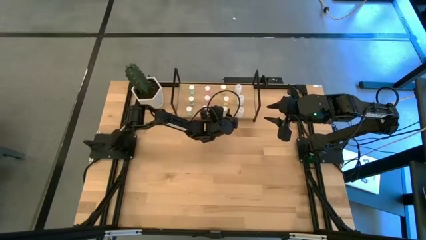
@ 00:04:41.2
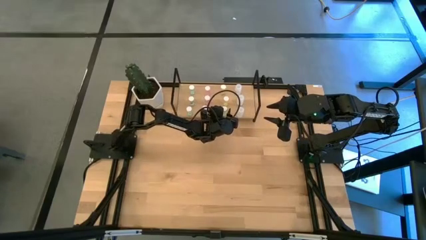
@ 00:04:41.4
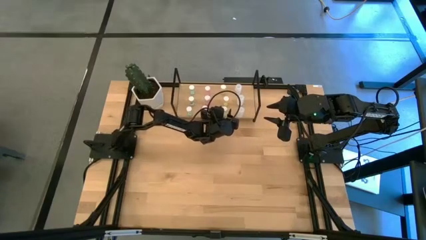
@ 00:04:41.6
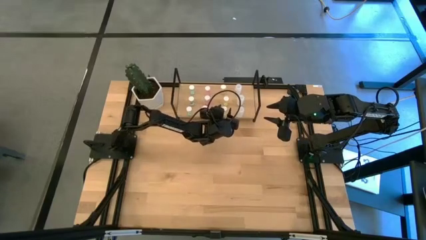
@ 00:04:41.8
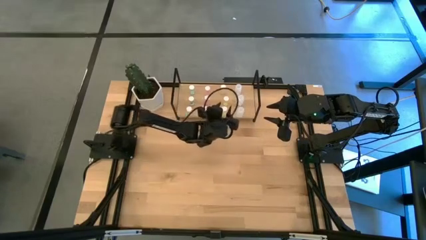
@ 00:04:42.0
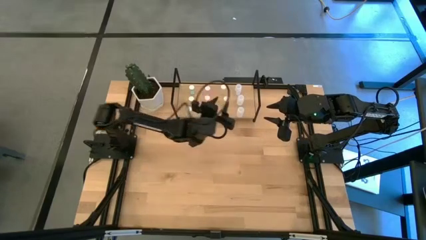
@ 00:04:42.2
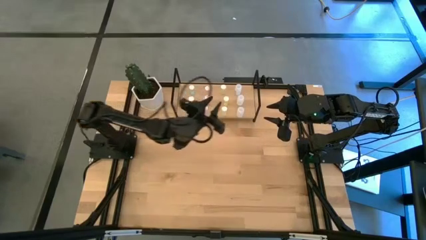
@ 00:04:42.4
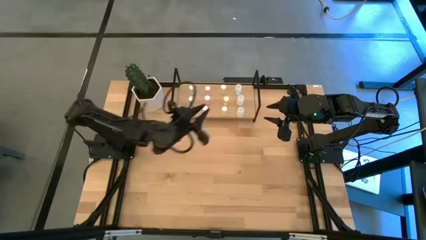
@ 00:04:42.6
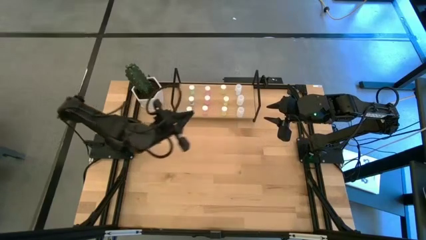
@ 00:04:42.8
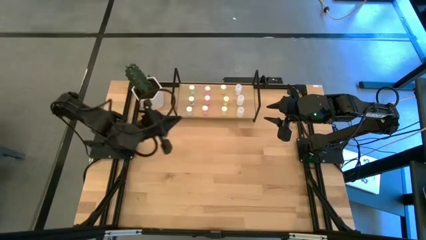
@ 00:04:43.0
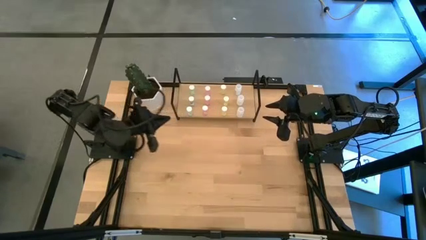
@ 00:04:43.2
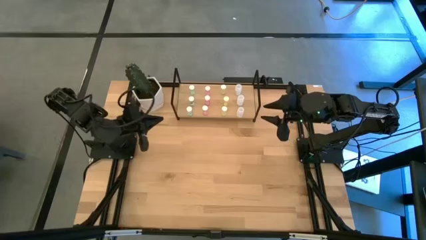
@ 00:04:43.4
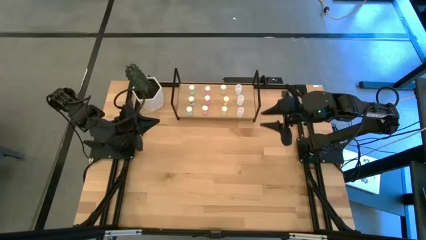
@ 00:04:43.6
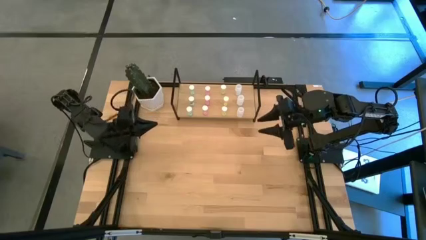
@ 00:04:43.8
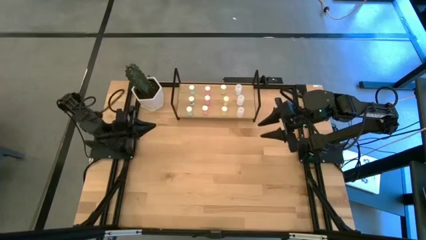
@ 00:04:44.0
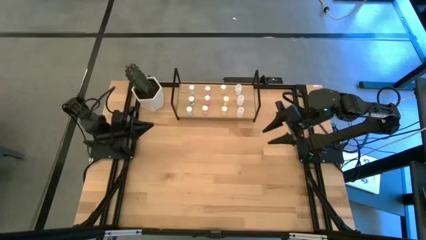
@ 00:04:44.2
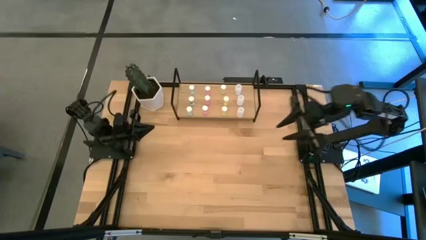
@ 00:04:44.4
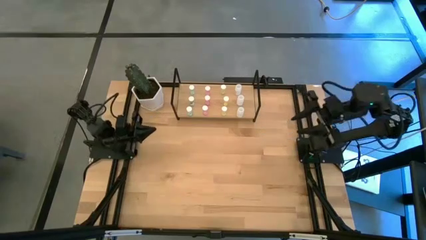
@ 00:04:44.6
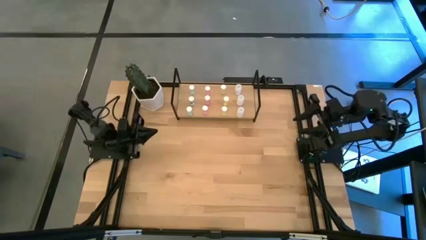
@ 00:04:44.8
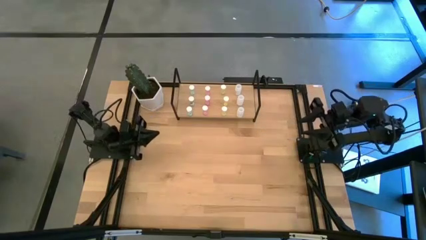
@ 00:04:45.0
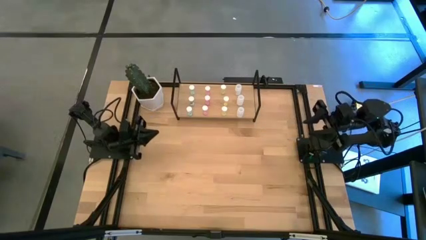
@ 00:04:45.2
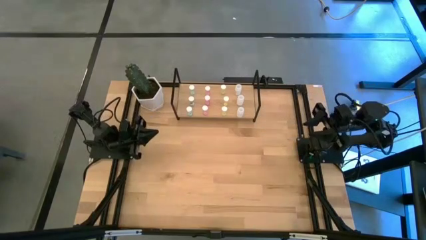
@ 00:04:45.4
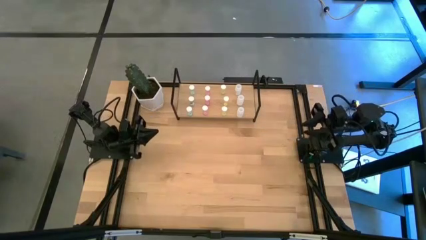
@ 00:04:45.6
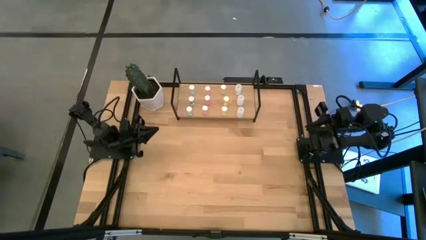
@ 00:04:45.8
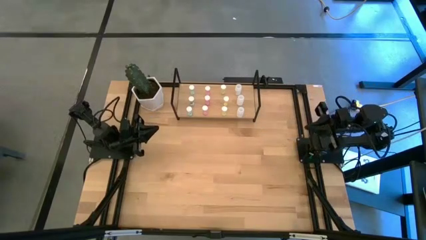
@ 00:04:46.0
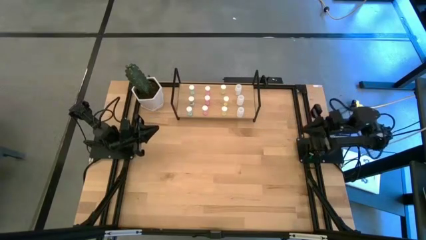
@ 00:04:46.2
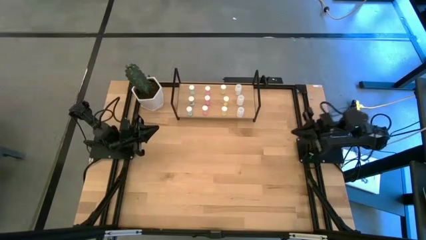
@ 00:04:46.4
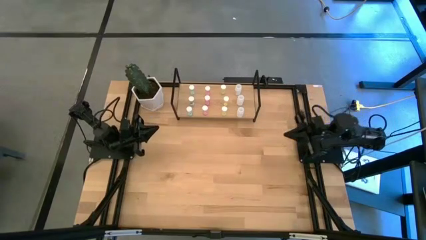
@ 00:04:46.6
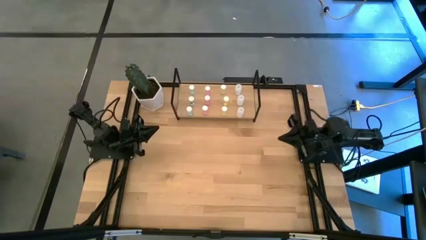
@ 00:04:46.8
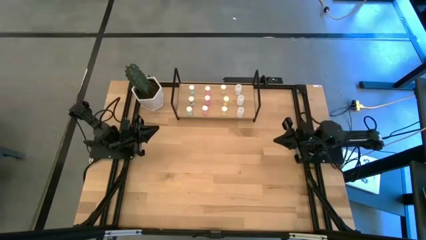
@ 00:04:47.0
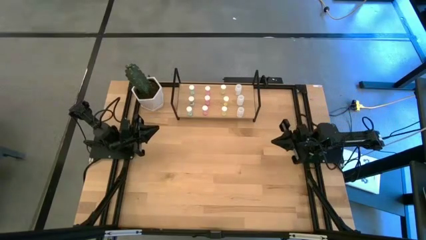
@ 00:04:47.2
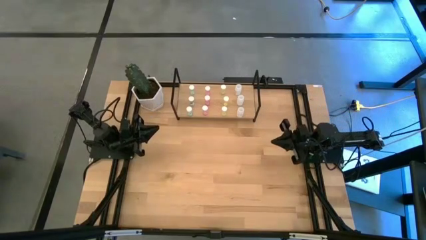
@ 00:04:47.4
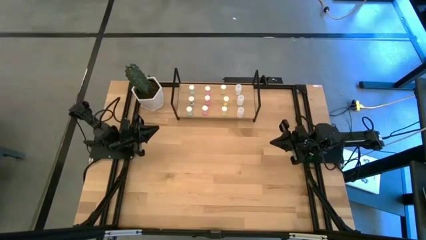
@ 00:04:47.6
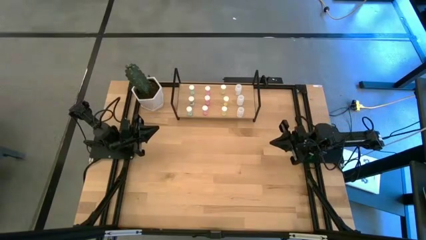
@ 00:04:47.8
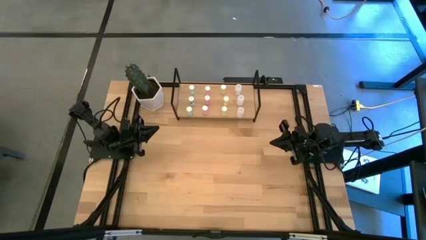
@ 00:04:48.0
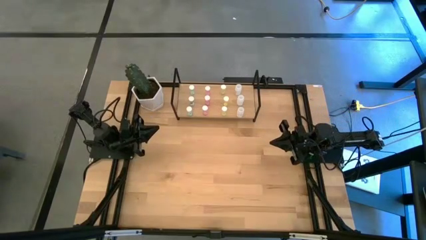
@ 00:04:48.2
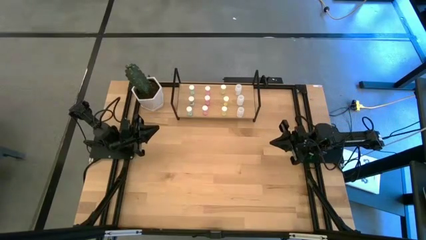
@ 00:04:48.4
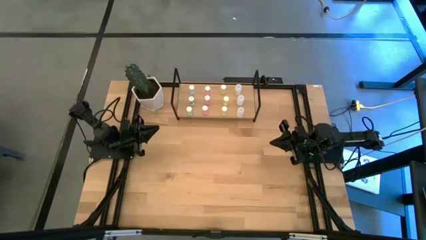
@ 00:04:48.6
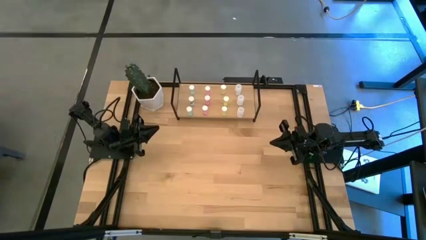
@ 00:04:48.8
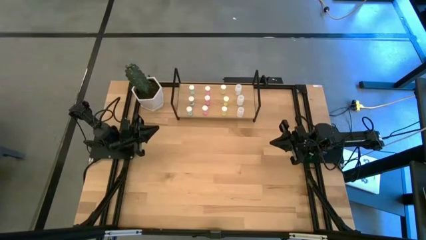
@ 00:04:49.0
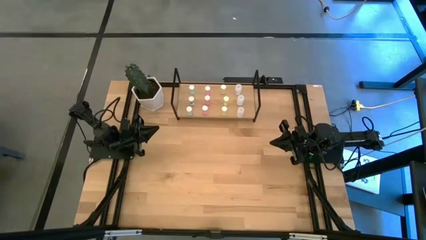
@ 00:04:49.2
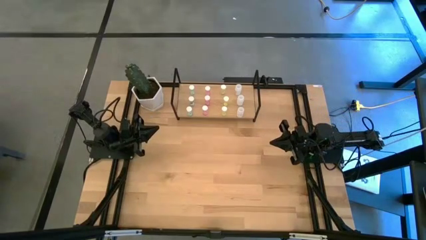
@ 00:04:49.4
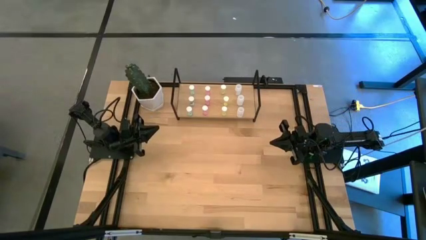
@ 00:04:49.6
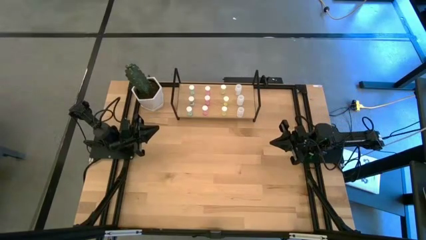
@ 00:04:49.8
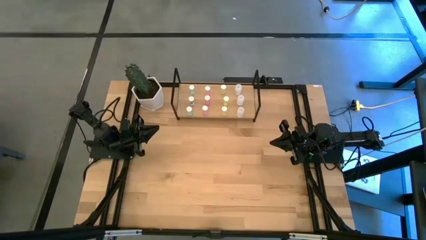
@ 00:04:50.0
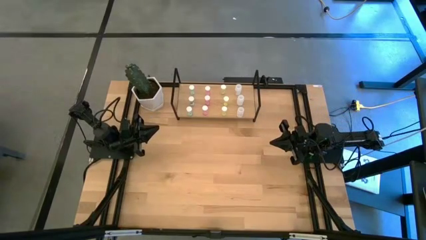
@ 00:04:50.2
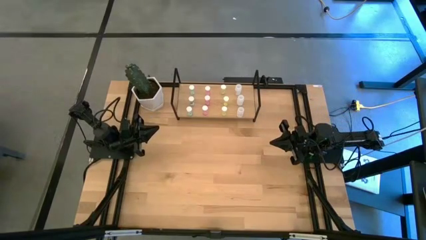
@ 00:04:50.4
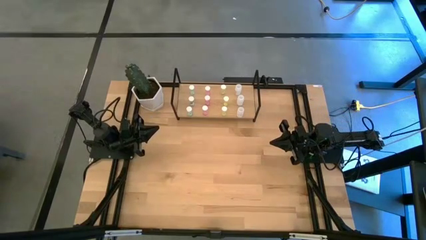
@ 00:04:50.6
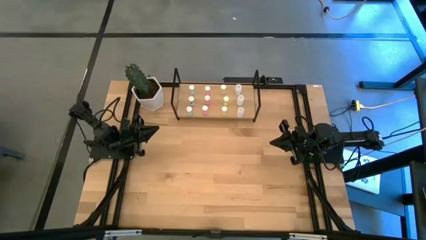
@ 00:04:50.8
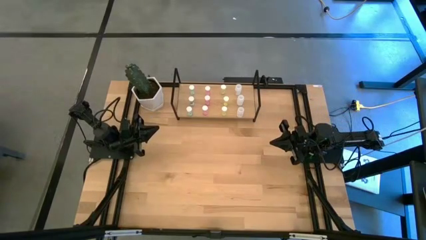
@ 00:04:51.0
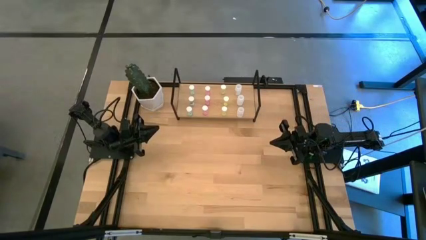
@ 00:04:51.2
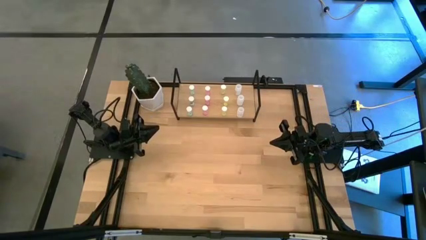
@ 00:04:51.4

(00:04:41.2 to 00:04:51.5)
Task: Pick and place medicine bottles onto shelf by color
Return to Home Position

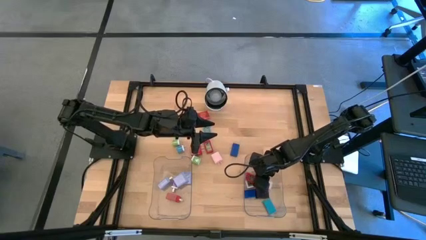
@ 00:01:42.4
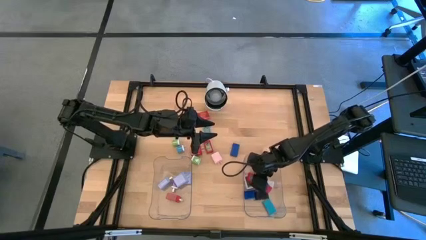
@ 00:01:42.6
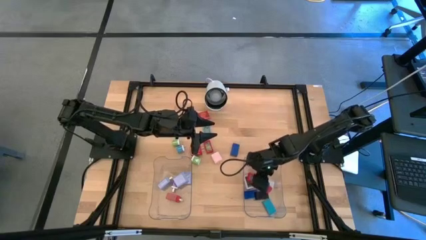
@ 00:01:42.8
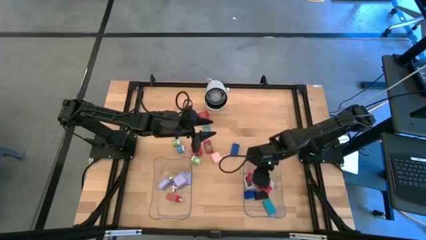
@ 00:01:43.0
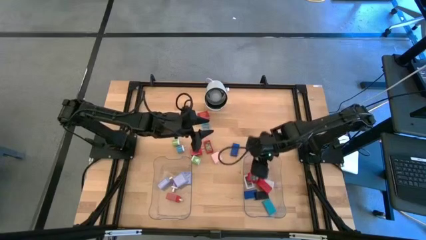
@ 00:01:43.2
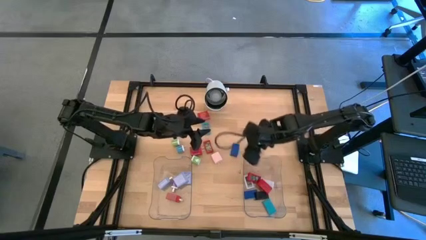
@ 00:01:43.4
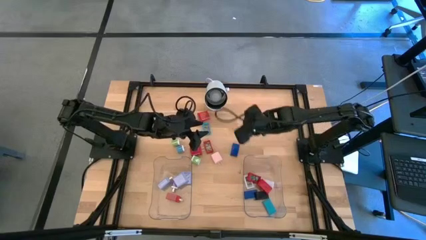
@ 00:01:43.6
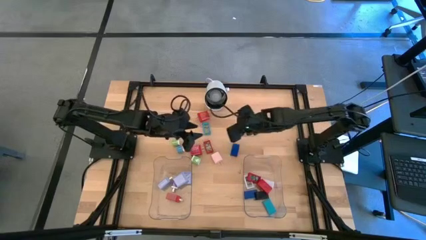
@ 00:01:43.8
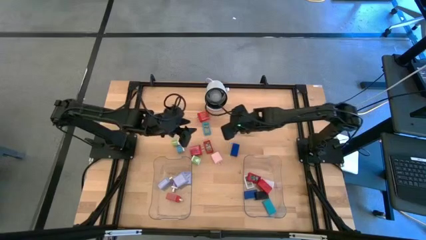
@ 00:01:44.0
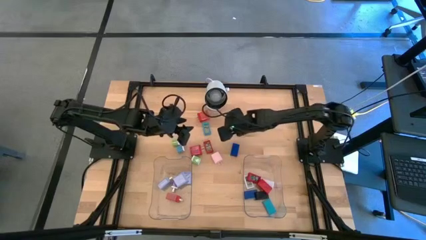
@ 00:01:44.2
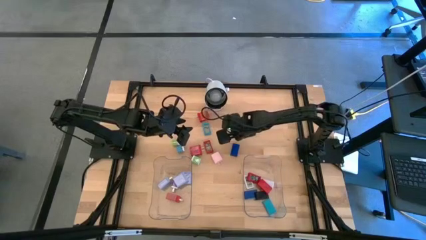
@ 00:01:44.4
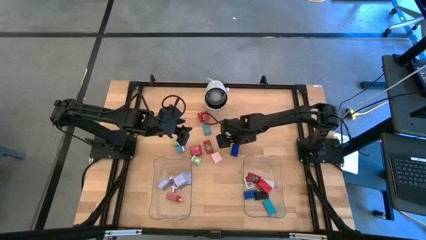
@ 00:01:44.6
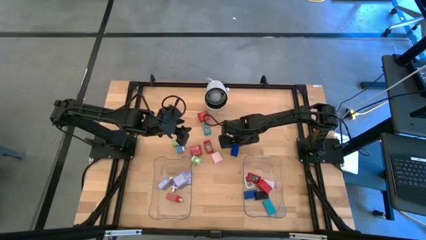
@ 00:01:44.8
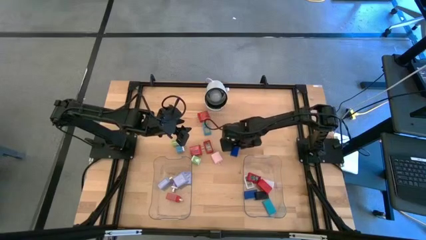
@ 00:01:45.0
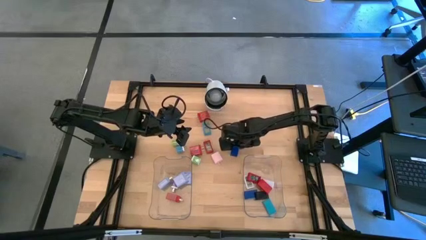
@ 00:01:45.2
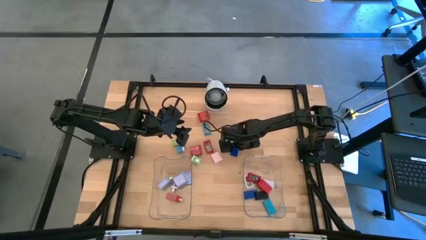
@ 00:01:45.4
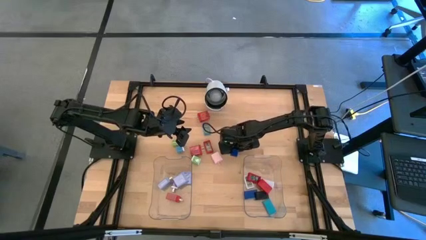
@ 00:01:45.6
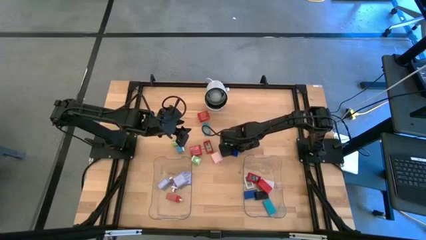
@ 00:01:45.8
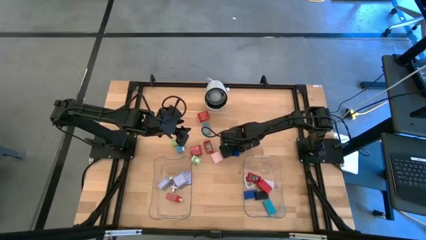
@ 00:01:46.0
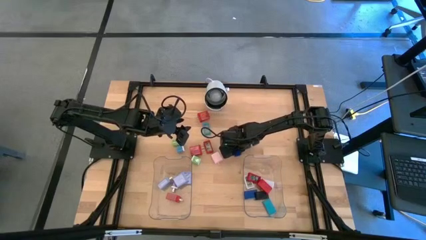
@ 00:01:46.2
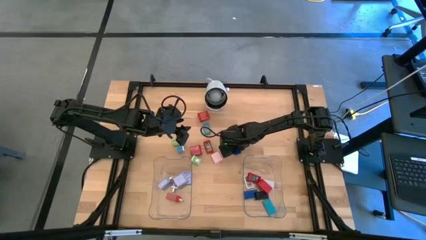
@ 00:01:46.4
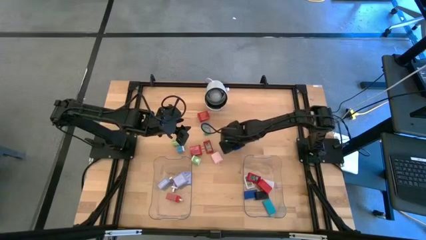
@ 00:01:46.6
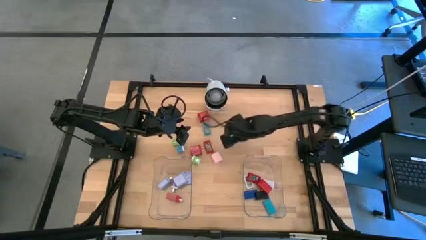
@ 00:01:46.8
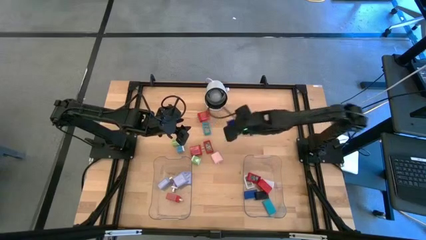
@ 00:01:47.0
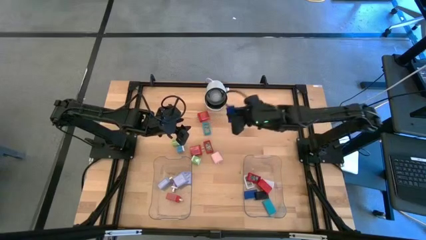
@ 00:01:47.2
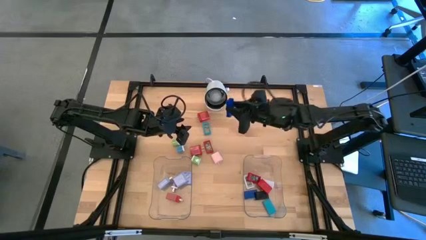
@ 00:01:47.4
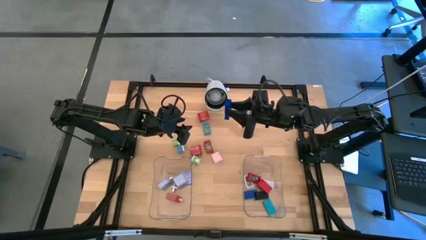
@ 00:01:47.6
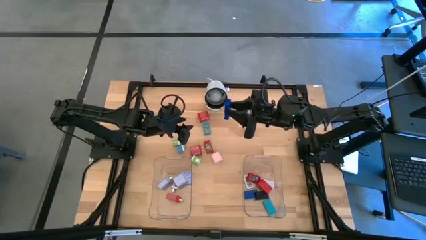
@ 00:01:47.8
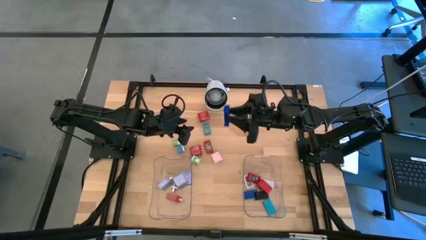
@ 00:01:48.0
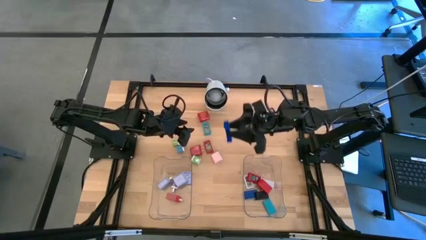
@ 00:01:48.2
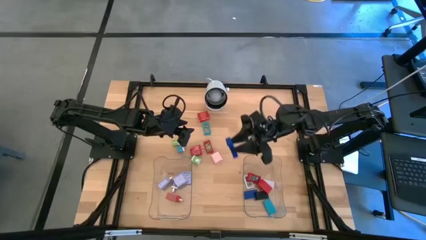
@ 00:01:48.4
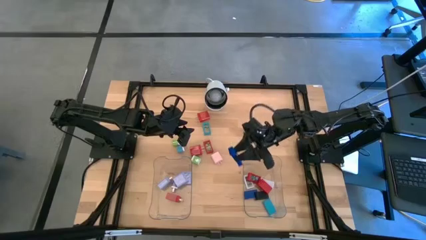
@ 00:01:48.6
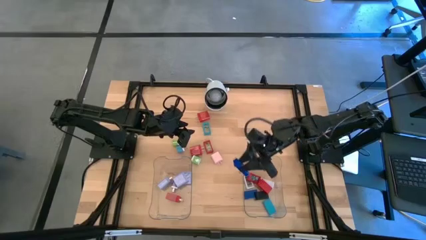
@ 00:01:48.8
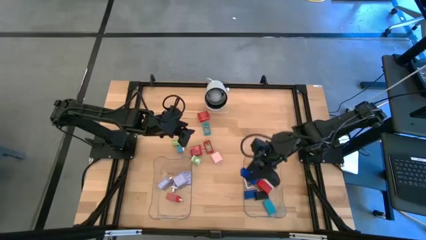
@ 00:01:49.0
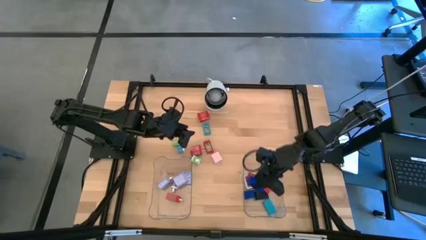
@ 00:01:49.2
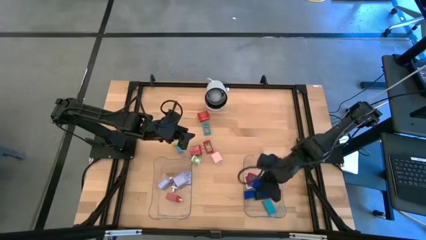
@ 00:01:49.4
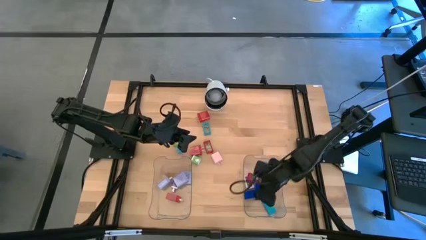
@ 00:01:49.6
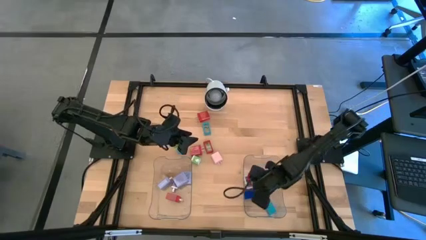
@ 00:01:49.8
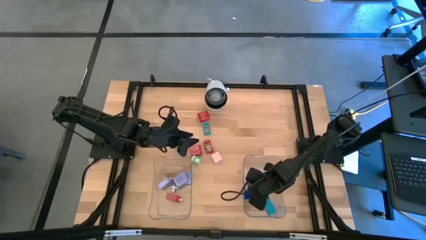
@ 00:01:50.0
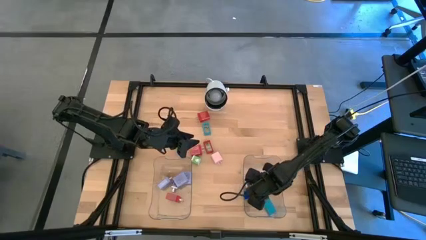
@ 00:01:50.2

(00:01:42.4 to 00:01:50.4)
Task: Pick & Place Office items
Put the blue timer into the right transparent bin
